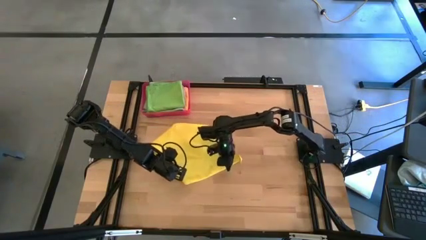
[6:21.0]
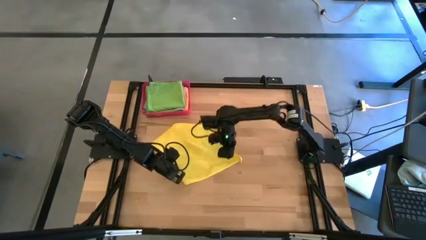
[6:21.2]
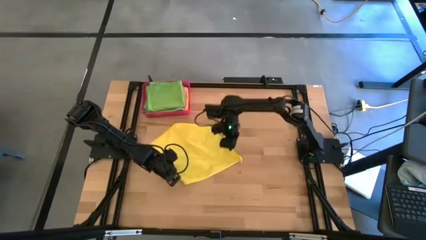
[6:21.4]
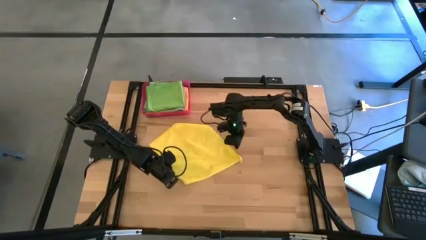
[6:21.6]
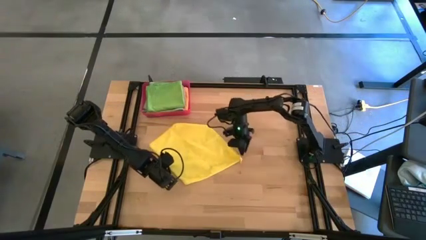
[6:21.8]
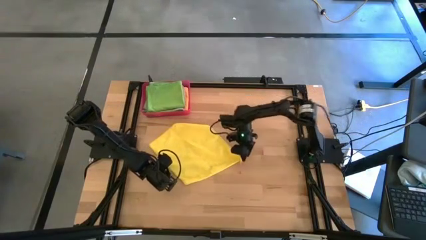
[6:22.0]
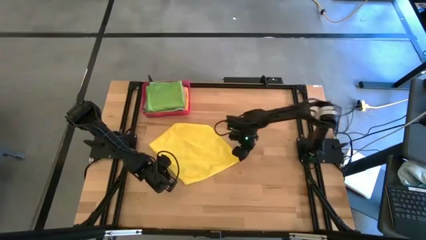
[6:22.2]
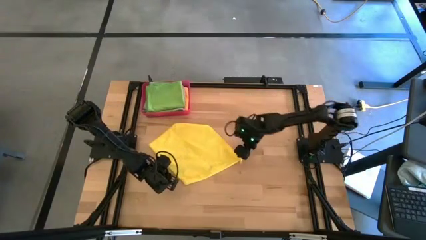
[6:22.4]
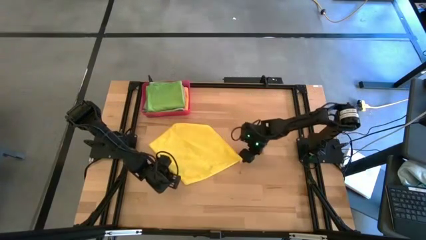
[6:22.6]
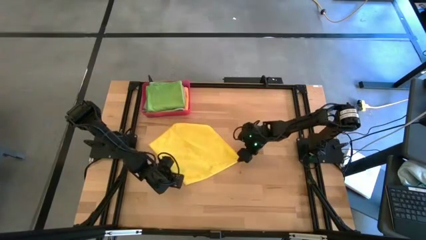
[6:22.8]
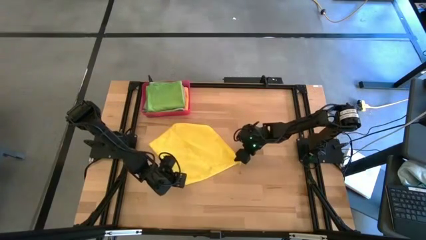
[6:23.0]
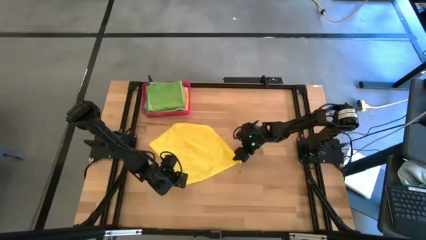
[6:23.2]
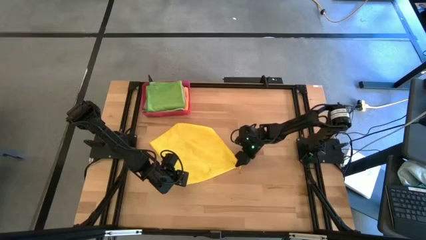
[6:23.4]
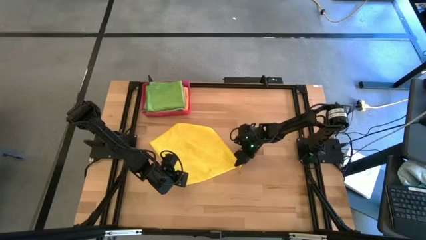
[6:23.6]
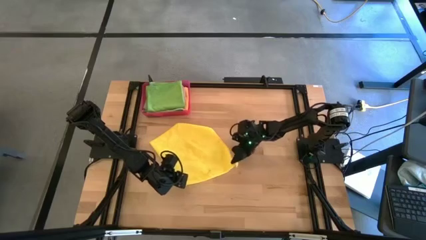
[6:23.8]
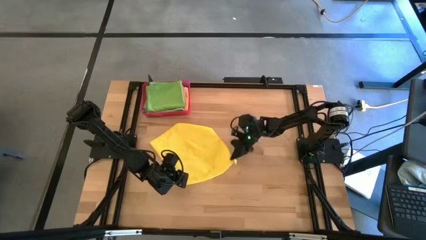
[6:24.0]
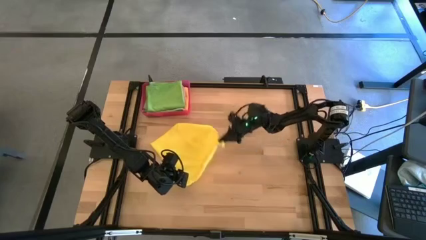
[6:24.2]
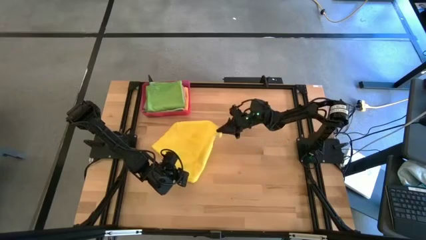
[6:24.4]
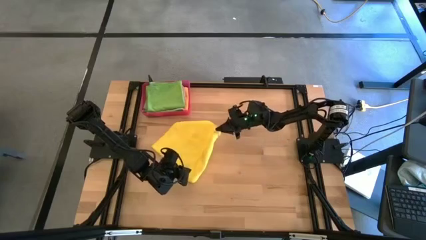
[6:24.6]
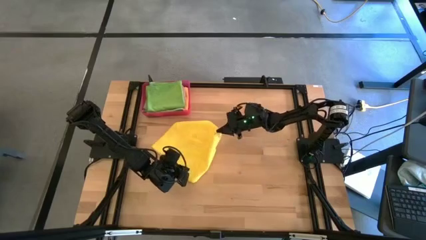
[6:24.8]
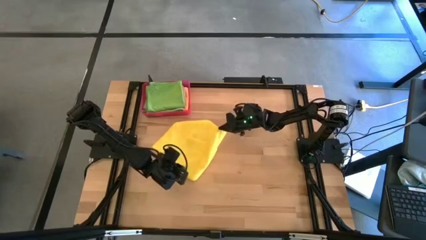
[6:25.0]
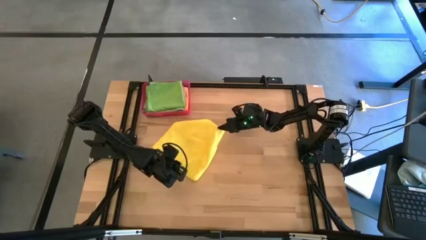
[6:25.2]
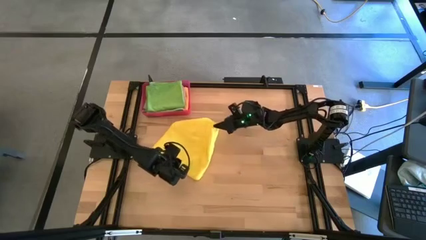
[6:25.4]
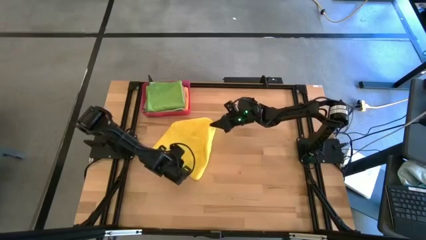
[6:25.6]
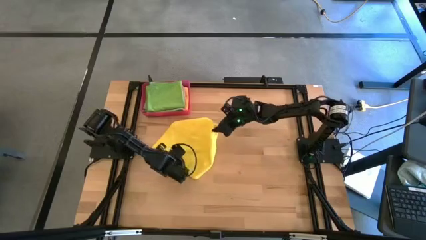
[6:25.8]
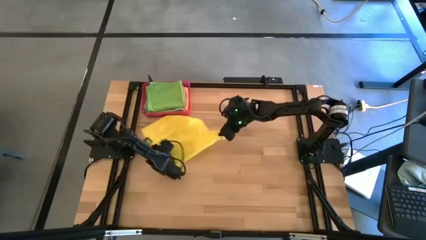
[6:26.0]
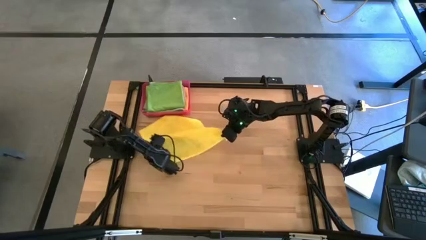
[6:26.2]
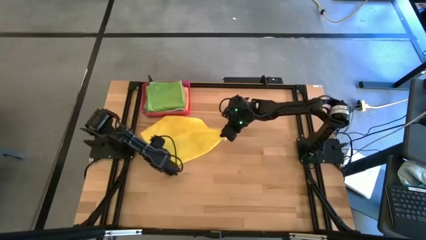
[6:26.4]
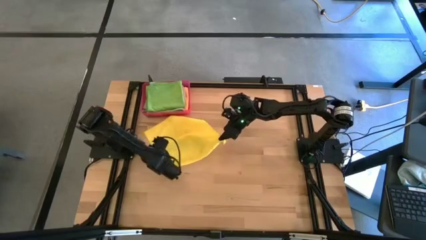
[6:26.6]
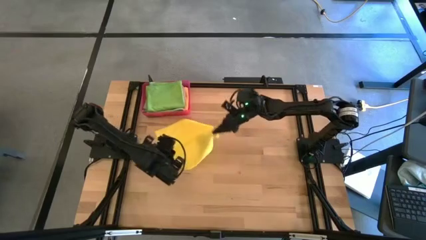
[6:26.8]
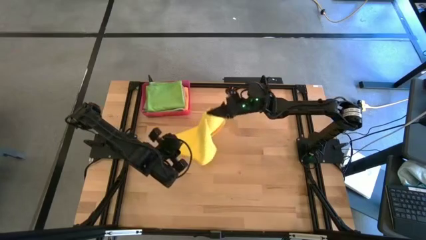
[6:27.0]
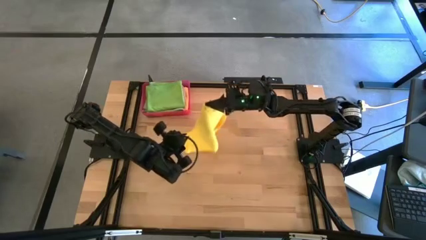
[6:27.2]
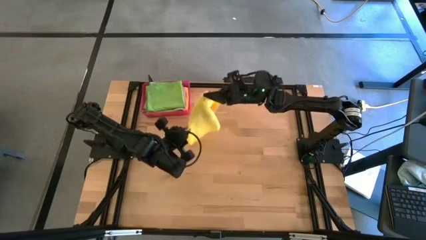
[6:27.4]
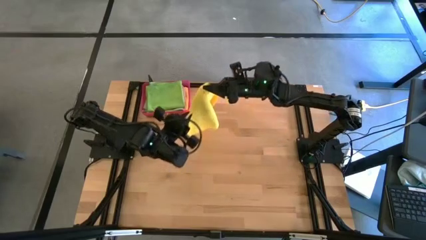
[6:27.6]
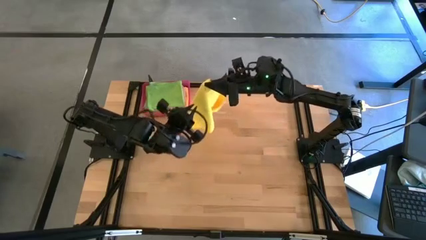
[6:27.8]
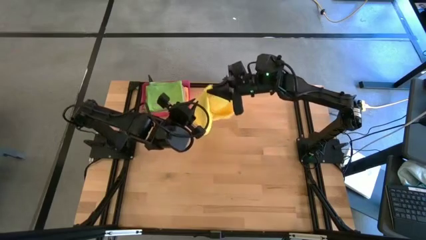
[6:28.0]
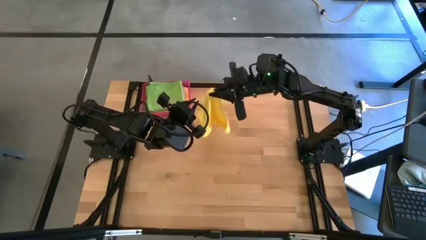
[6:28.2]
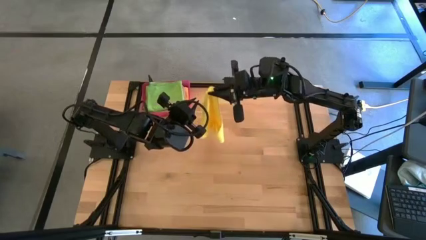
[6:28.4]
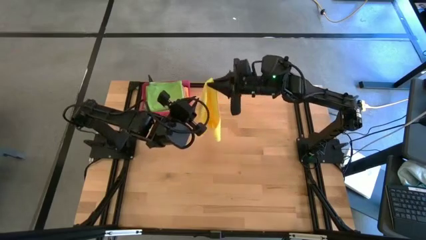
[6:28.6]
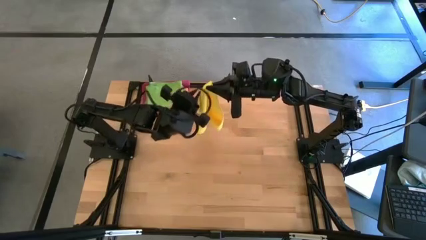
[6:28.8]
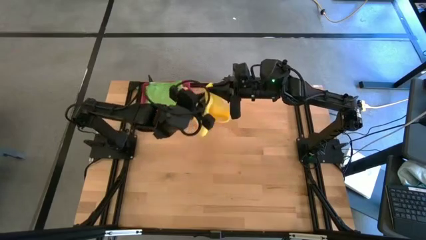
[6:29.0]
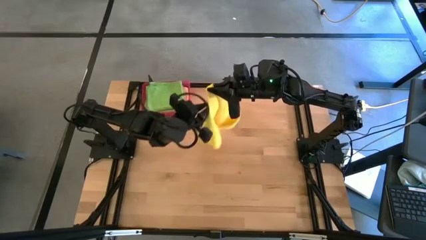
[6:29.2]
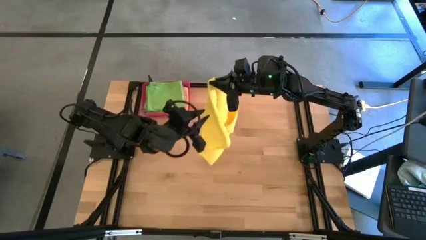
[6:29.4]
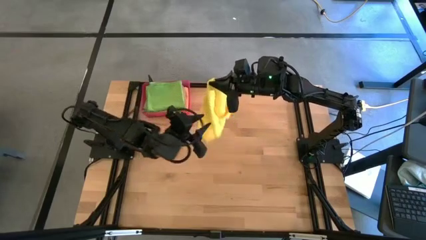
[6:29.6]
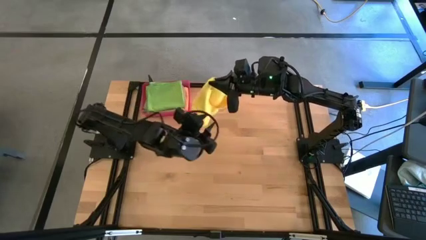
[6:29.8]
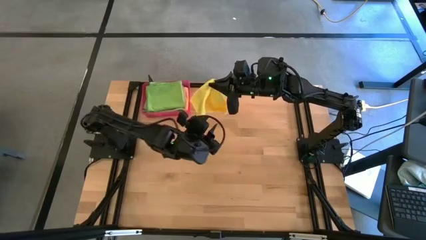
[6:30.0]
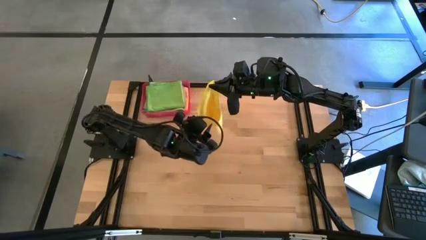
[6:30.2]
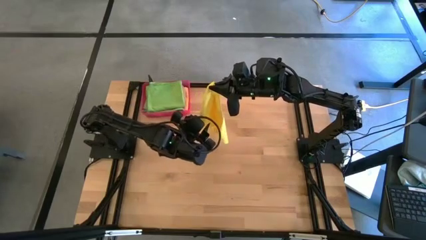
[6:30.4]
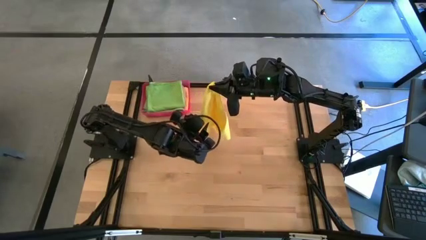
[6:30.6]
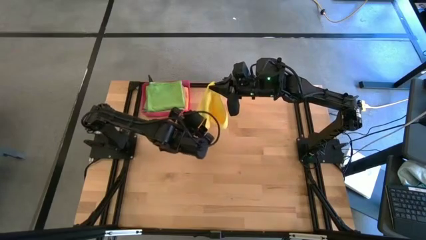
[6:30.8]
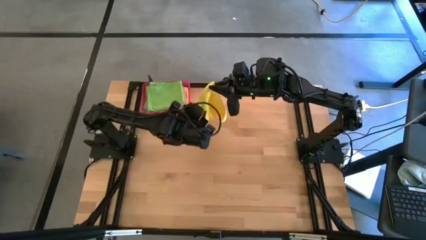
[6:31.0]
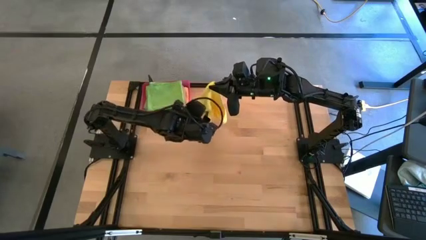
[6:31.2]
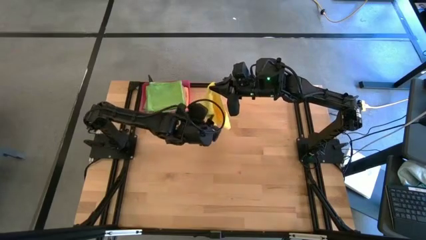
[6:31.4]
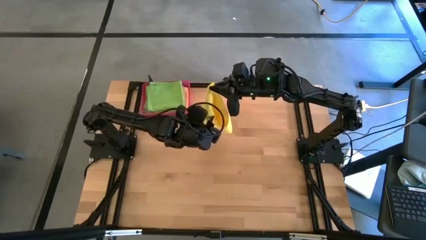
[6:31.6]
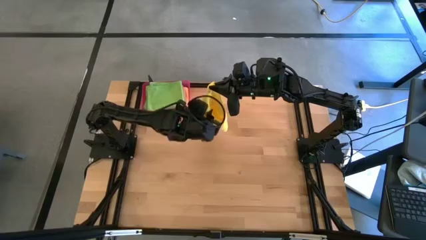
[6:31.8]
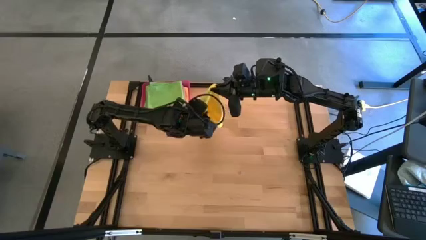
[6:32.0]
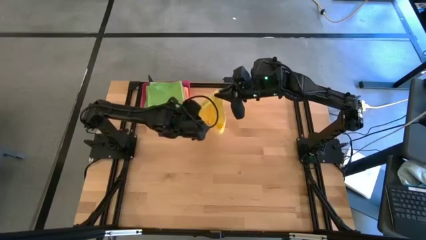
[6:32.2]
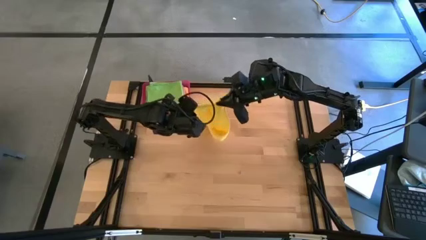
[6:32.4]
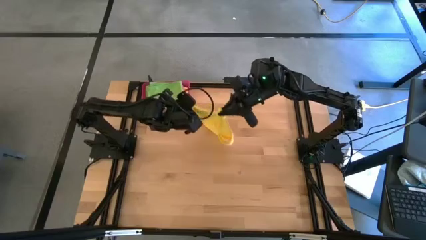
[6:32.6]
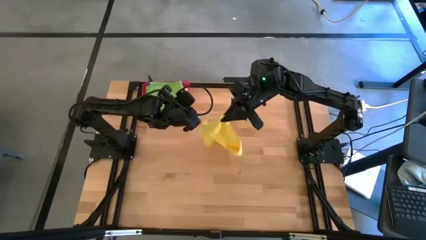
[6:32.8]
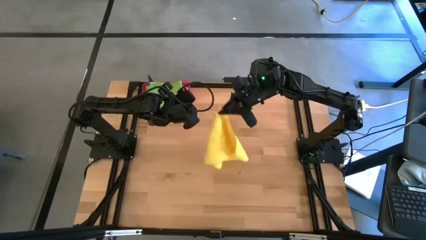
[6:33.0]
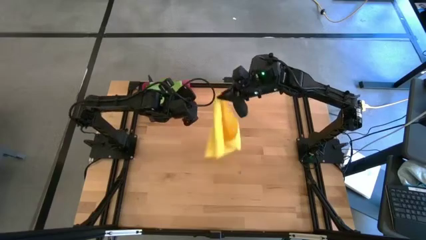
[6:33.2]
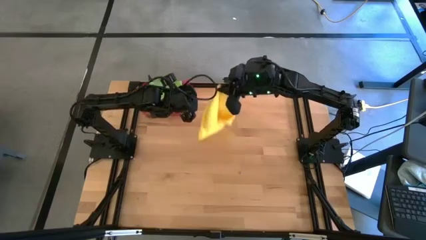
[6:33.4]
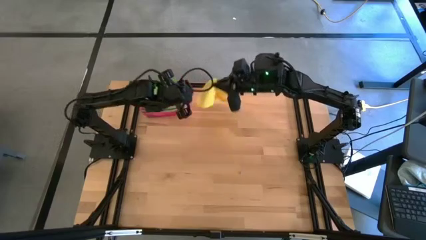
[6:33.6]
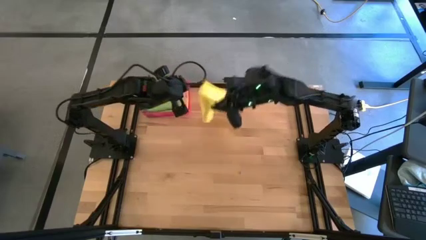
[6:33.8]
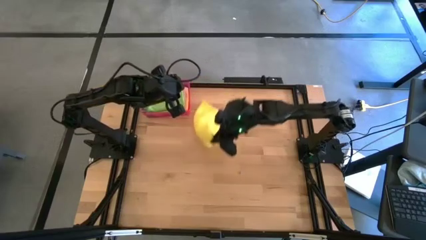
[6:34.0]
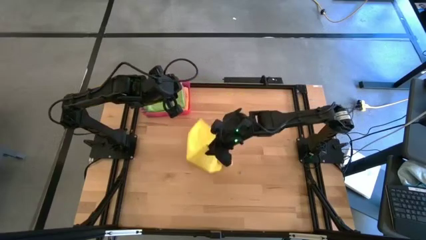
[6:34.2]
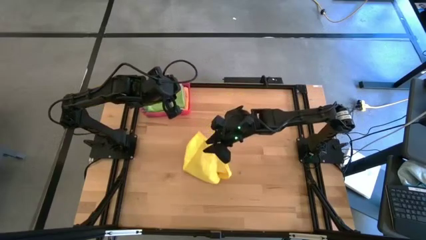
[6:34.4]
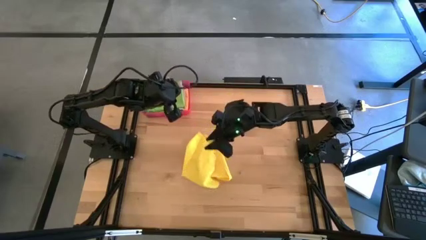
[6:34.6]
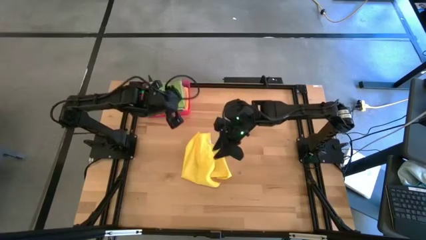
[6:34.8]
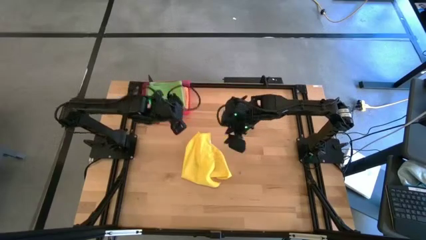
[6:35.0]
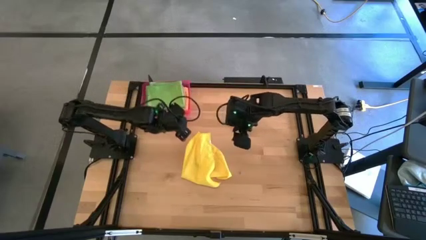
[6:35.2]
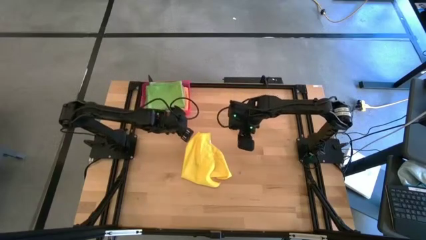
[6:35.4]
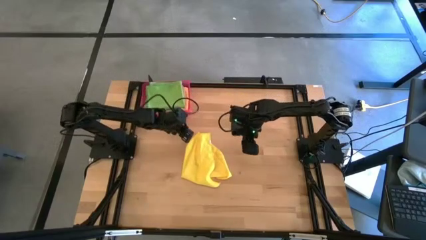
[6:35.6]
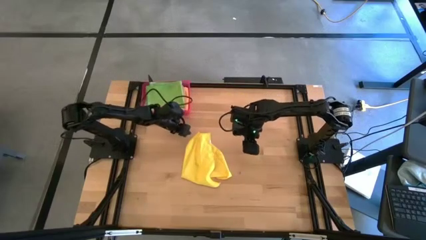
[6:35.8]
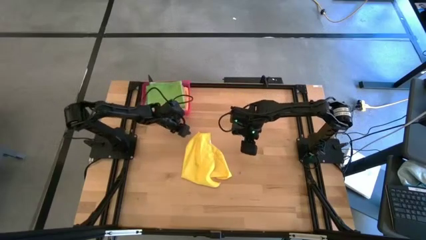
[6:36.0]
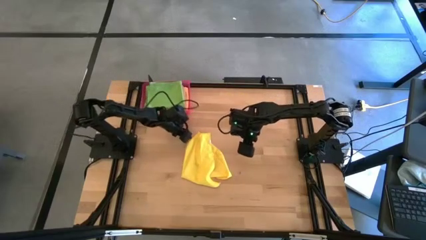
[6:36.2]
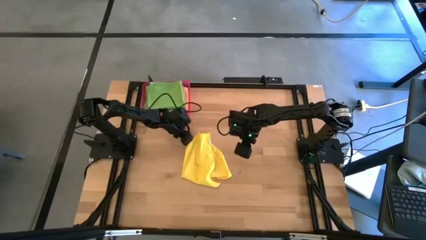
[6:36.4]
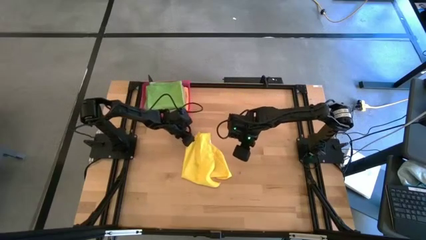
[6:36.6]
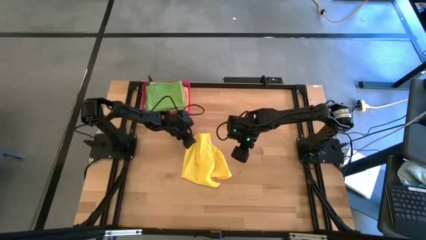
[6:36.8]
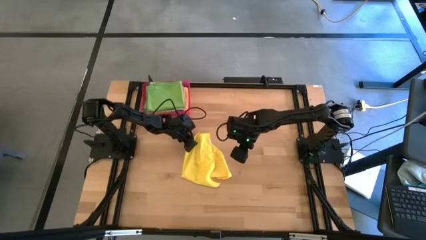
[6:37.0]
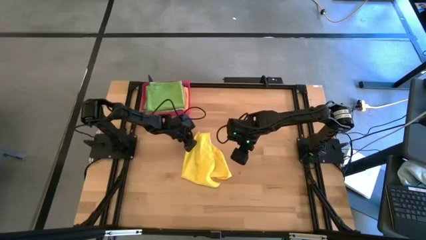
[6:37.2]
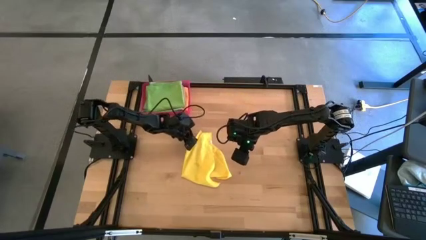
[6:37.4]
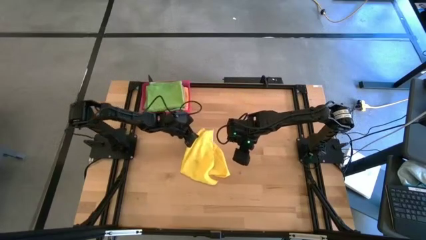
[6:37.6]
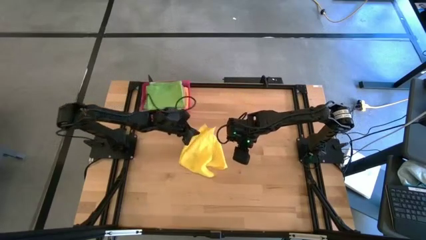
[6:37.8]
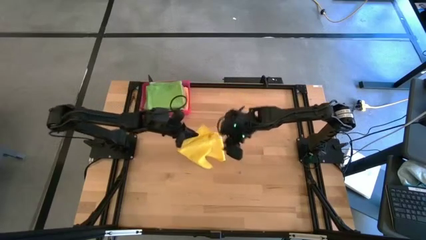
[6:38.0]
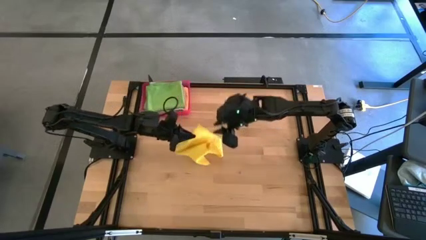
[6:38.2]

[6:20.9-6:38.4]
Task: Fold microfiber towels
Fold the yellow microfiber towel
